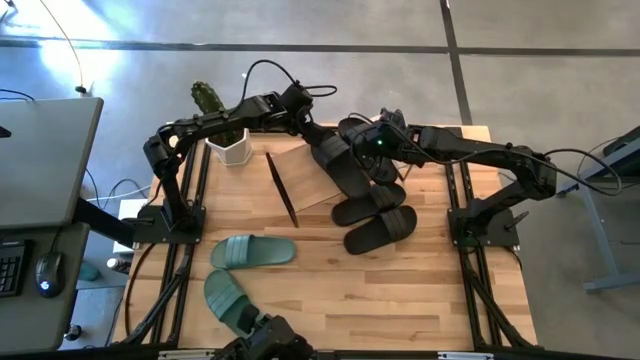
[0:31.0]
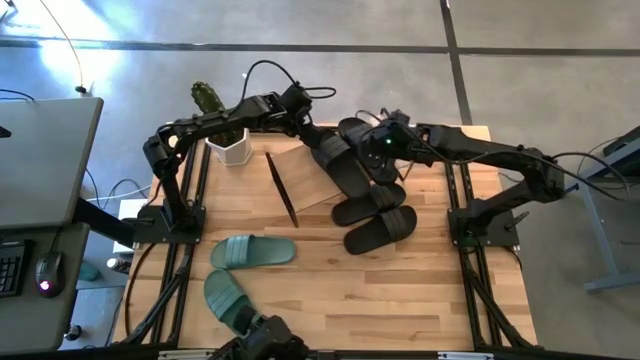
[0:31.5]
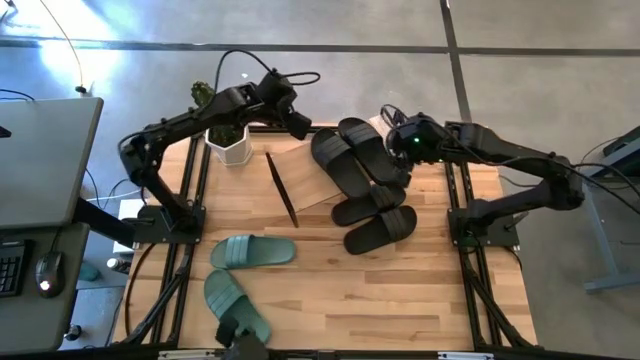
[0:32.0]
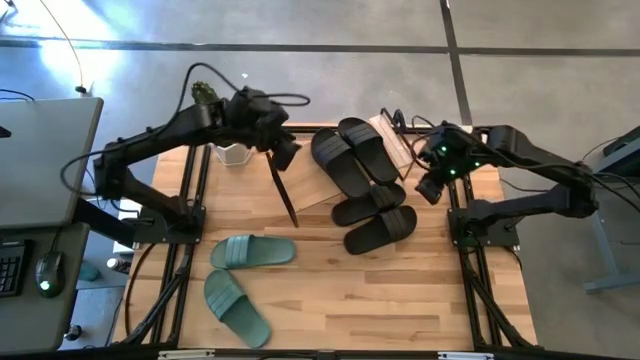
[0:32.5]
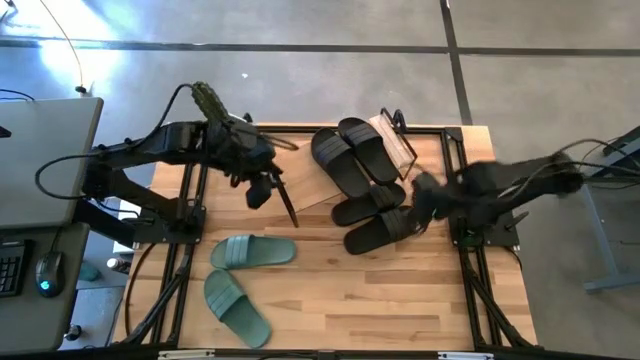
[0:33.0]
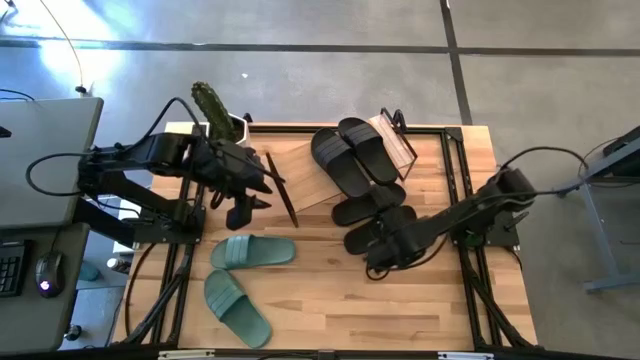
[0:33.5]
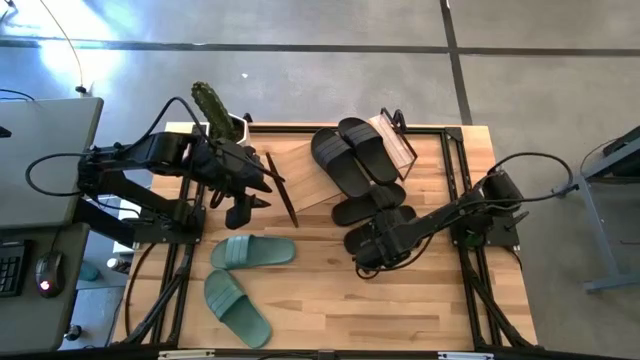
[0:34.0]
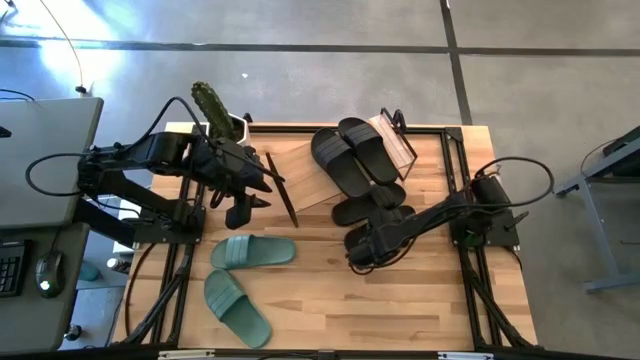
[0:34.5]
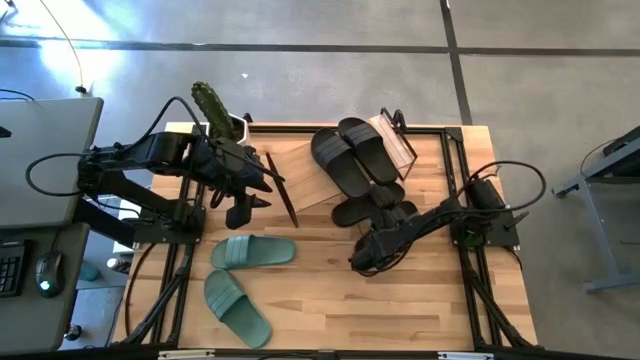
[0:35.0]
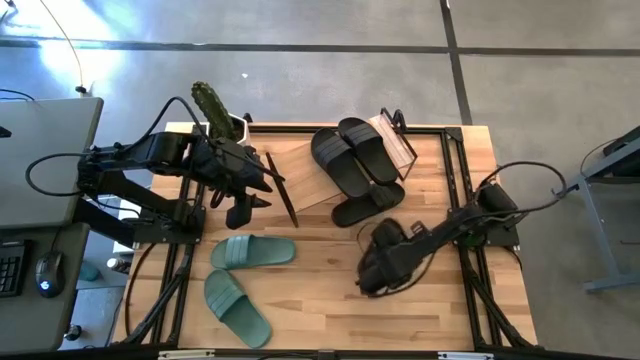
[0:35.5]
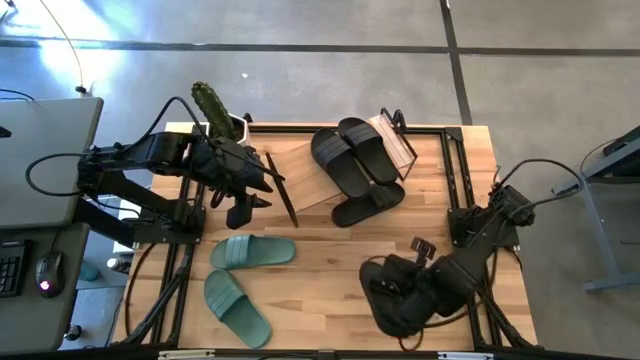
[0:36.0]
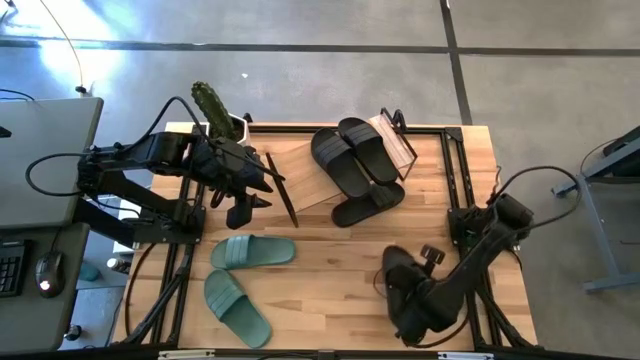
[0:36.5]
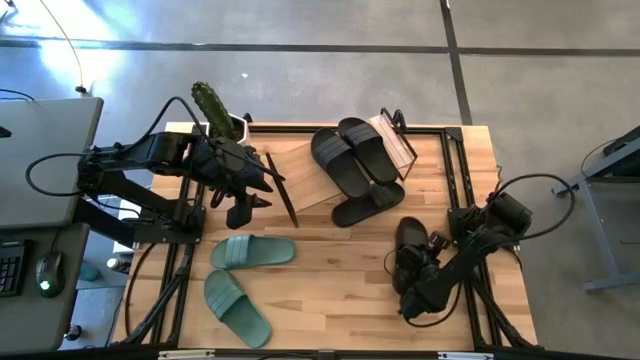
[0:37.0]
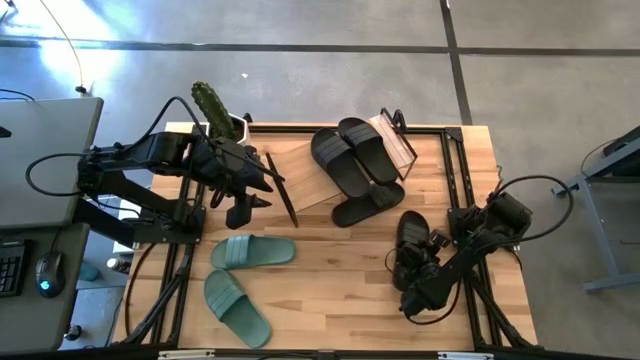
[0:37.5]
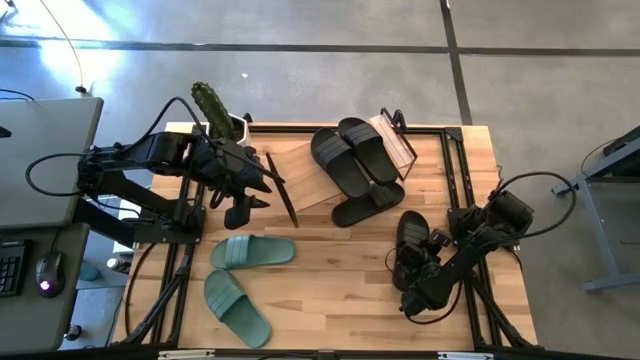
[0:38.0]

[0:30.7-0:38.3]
Task: Pick and place slides into the shelf
Adjust the black slipper

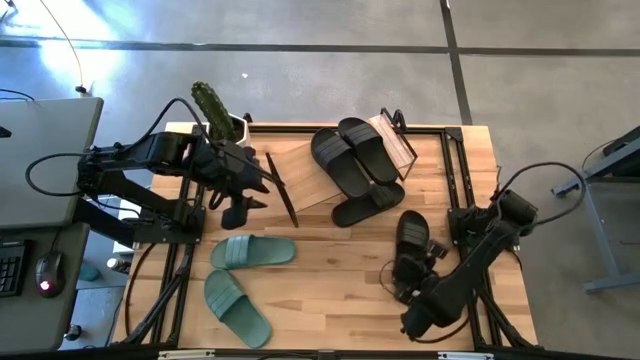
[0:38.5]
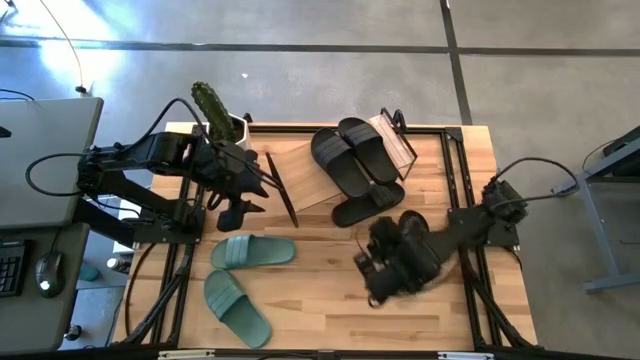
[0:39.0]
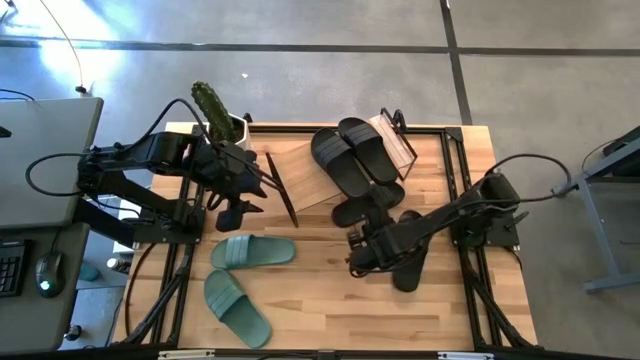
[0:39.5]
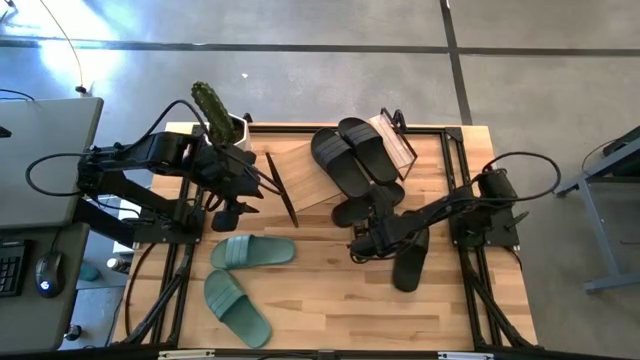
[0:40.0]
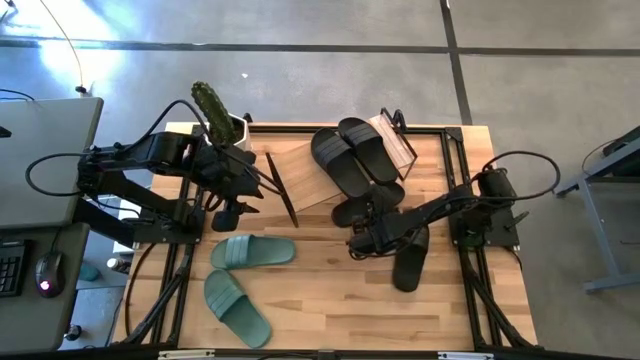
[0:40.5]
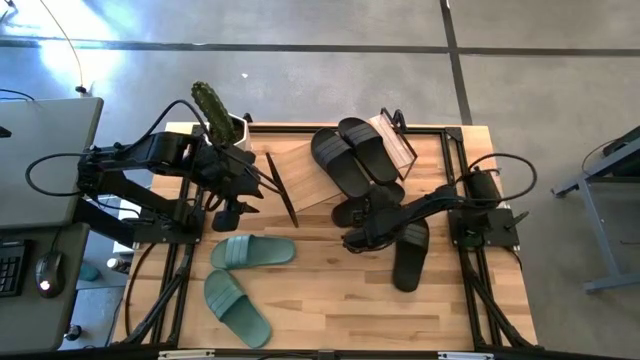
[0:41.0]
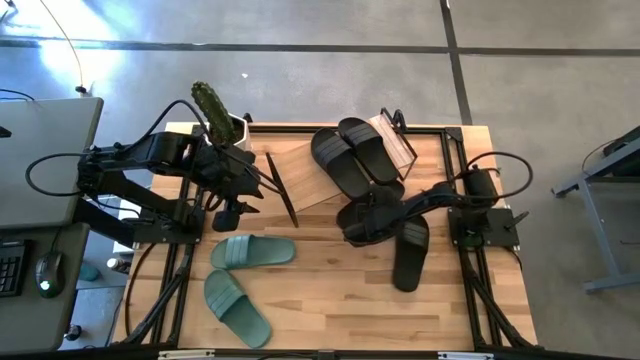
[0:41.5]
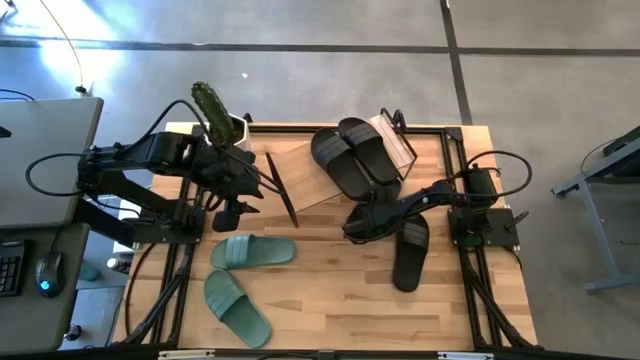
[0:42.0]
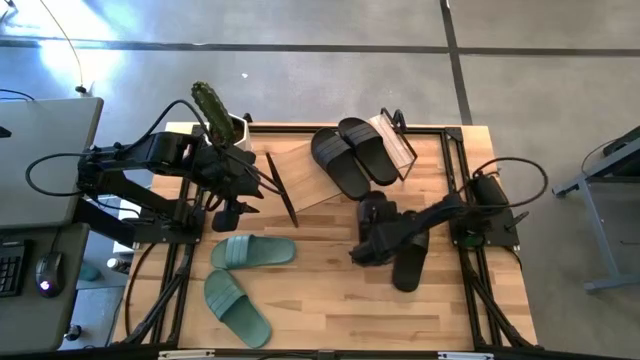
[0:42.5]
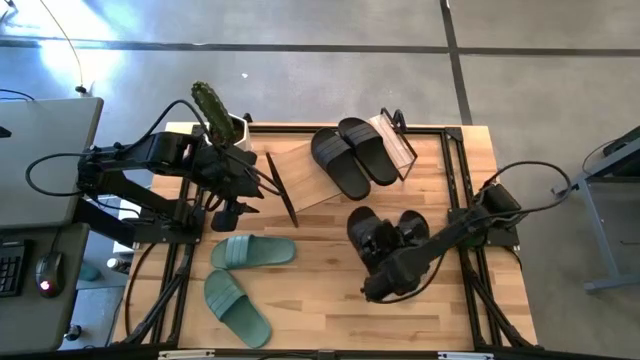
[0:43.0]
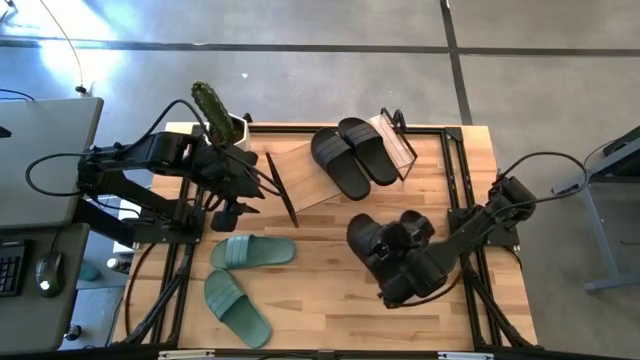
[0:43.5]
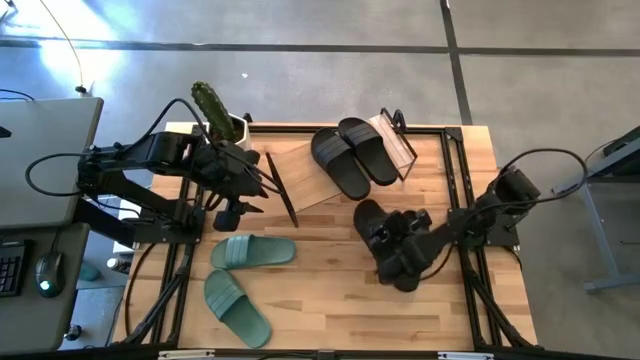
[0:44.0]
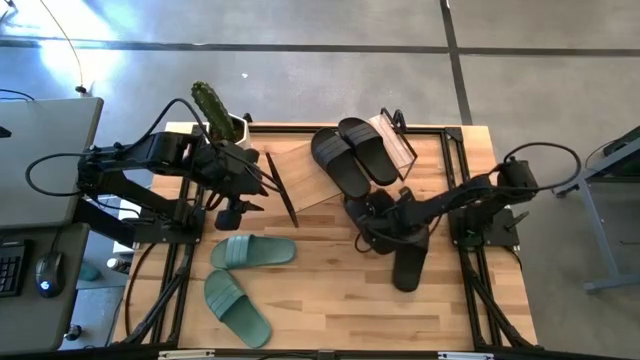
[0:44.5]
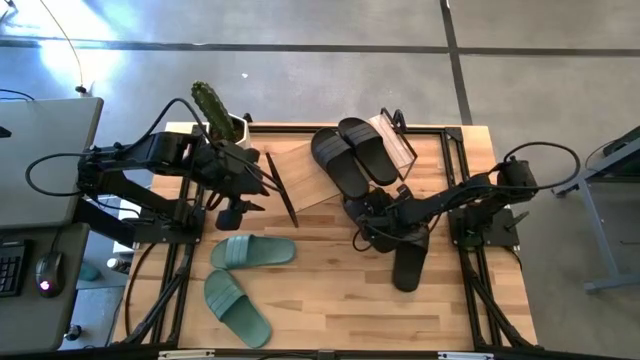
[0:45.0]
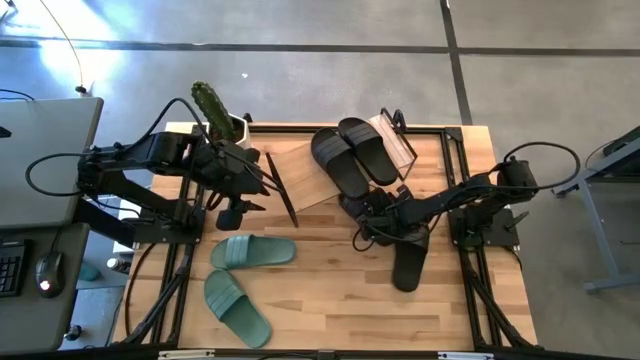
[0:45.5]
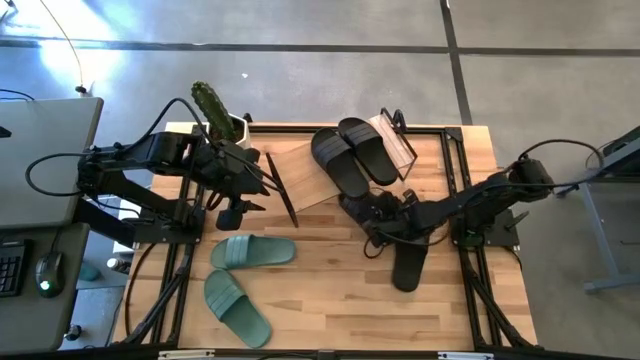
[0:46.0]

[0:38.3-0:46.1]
Put the black slipper under the shelf

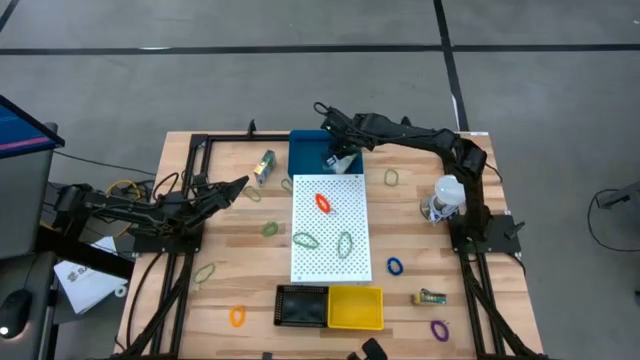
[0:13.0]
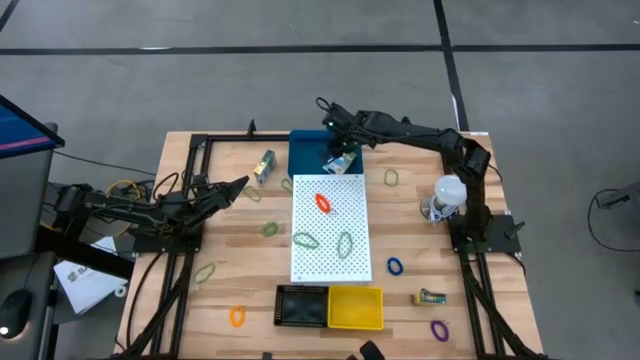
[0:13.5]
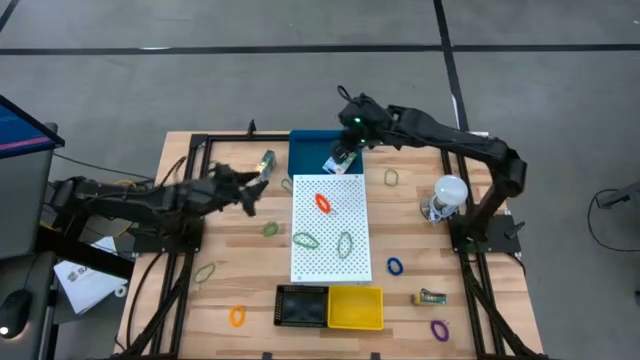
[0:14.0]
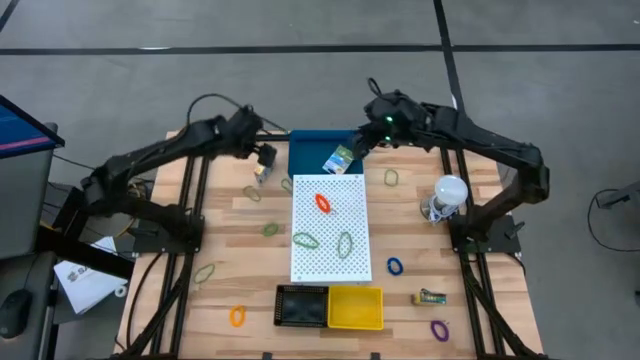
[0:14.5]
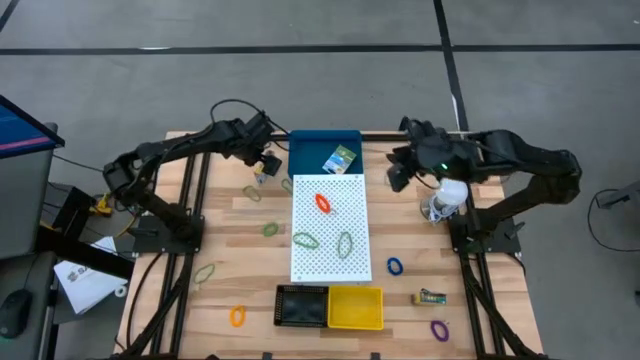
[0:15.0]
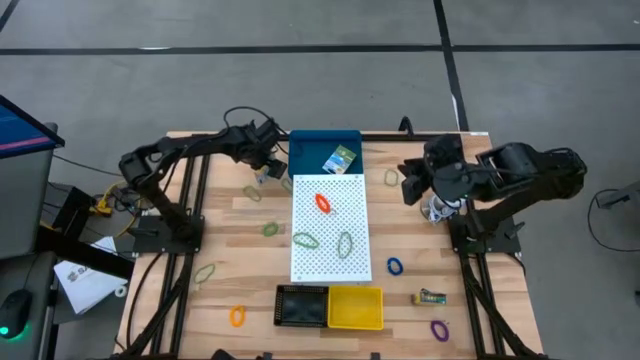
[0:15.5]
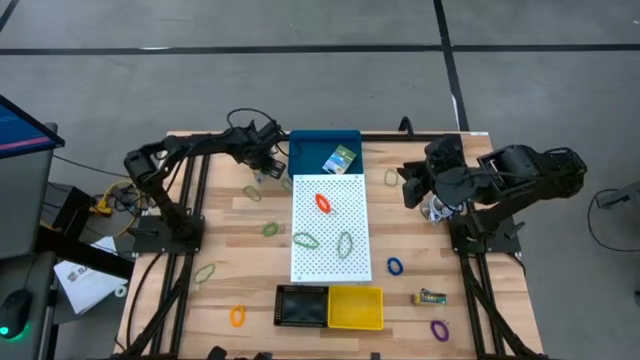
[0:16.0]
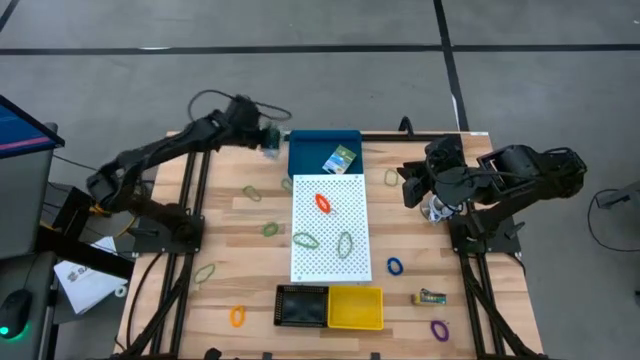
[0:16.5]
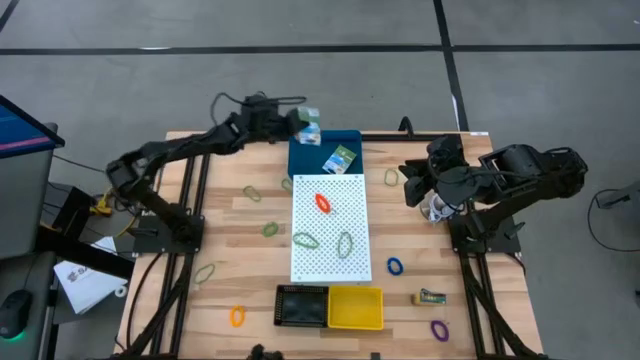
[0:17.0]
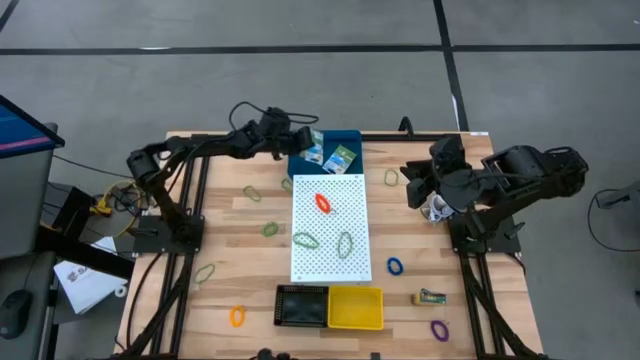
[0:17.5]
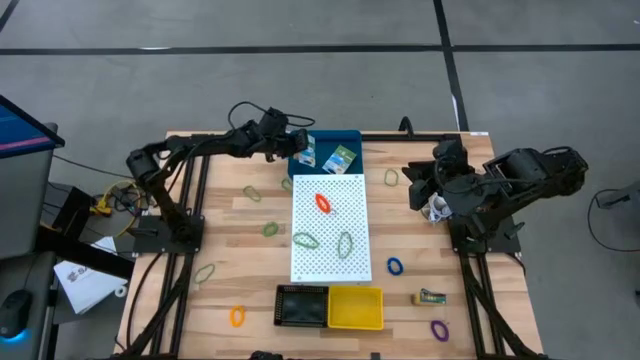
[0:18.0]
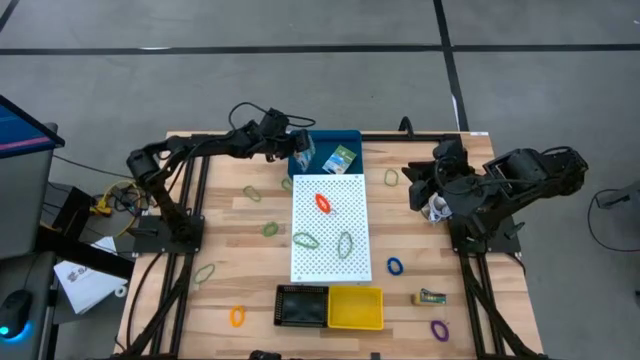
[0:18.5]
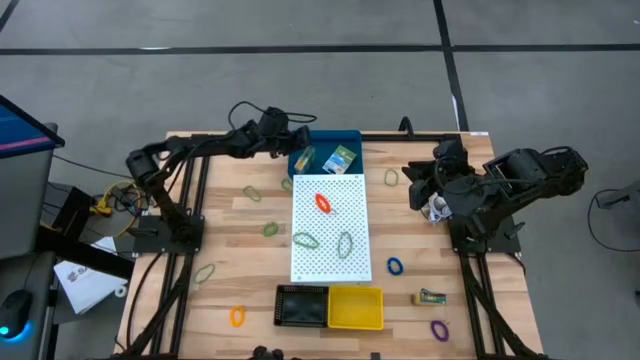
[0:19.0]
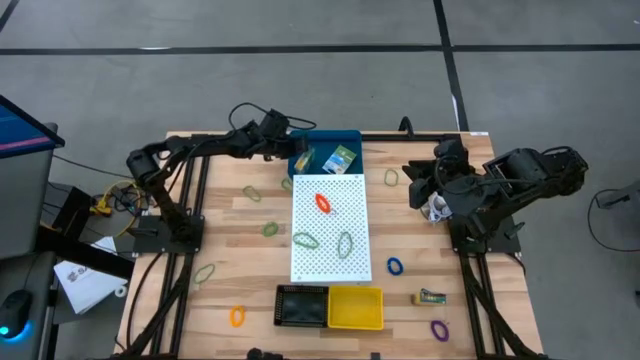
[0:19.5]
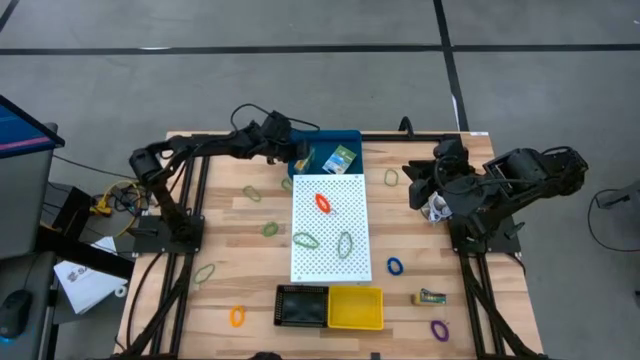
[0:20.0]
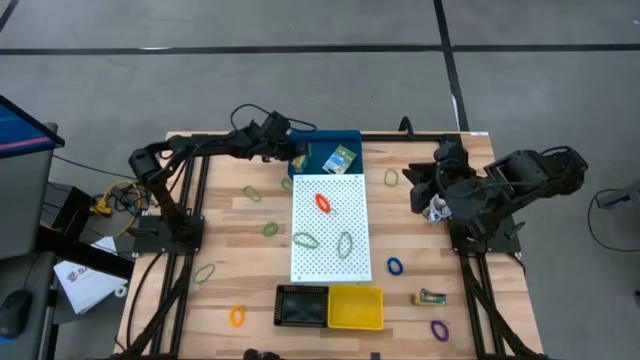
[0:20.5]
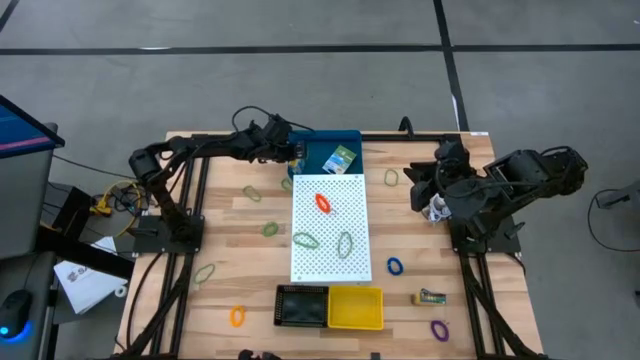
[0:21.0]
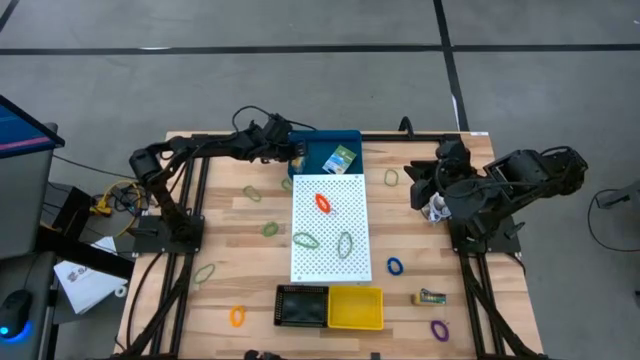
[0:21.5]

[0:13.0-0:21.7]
Task: Pick & Place Office Desk Supplies
Put the crayon box into the blue bin
